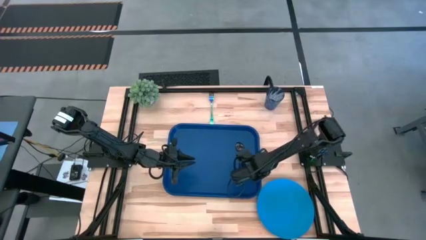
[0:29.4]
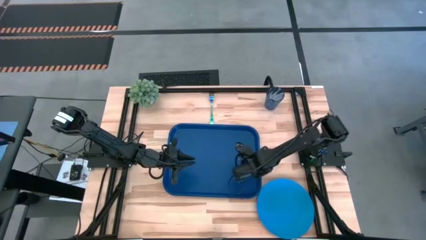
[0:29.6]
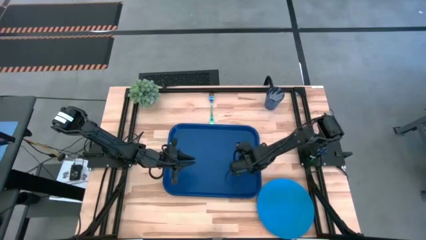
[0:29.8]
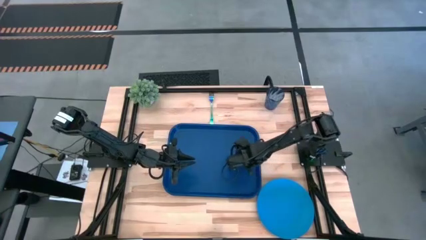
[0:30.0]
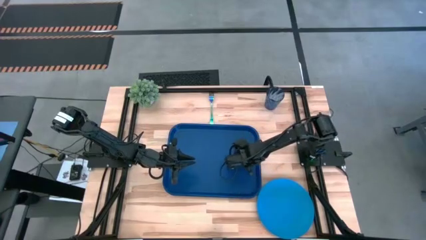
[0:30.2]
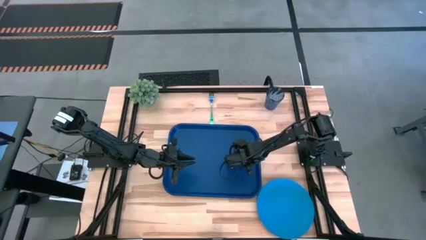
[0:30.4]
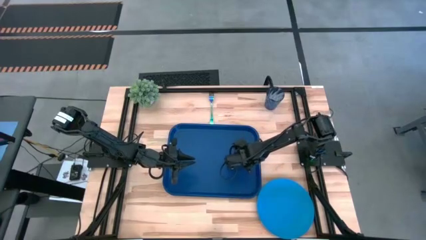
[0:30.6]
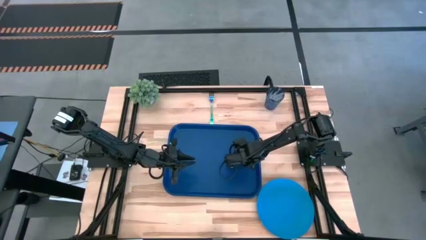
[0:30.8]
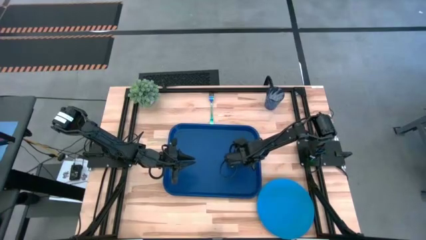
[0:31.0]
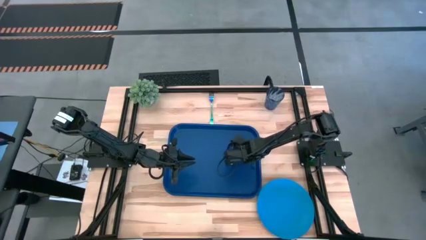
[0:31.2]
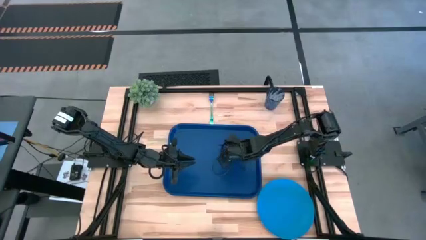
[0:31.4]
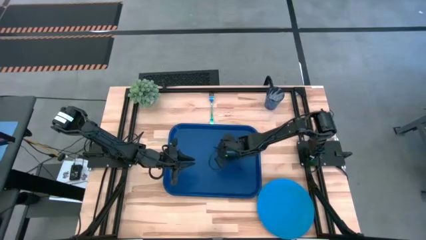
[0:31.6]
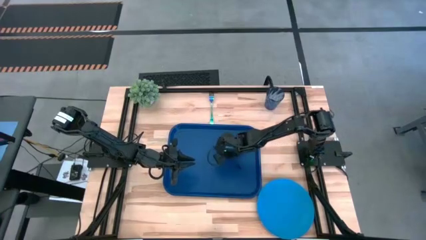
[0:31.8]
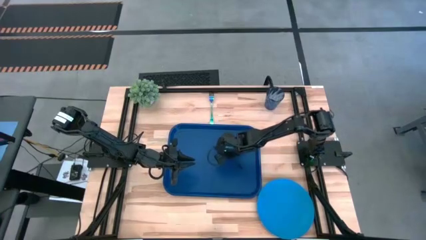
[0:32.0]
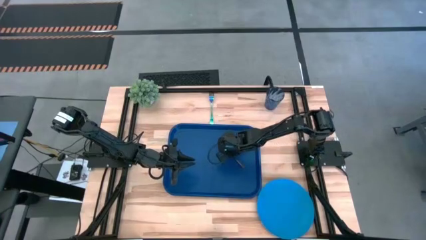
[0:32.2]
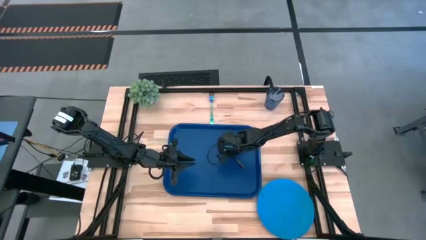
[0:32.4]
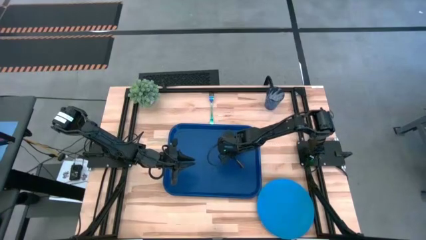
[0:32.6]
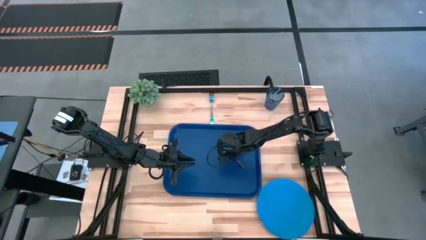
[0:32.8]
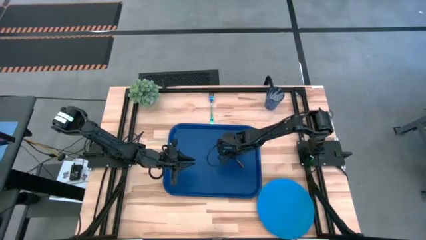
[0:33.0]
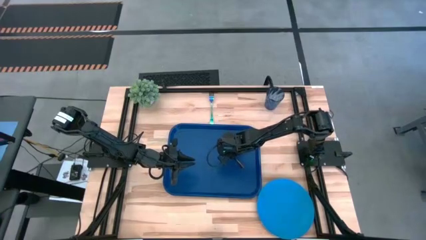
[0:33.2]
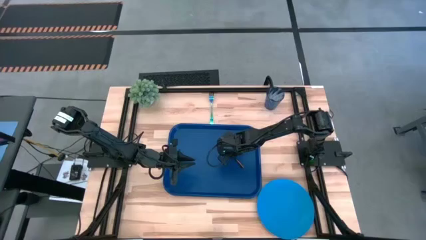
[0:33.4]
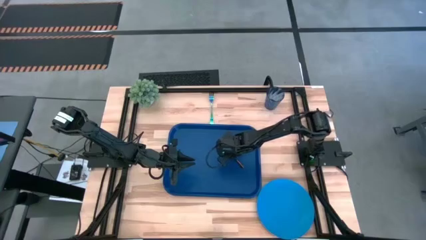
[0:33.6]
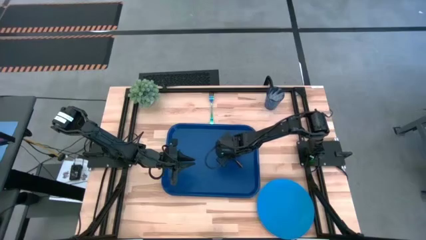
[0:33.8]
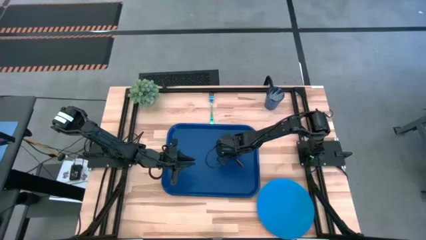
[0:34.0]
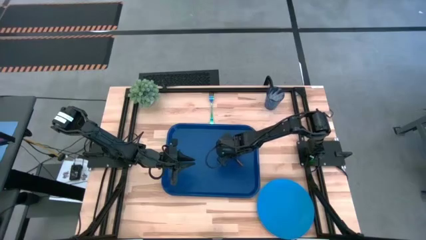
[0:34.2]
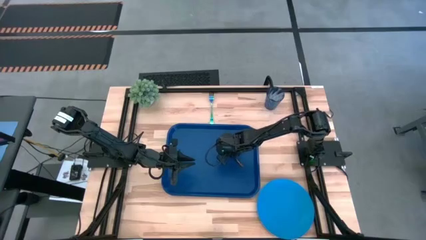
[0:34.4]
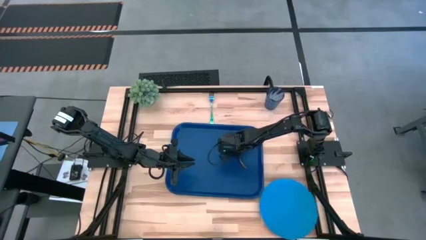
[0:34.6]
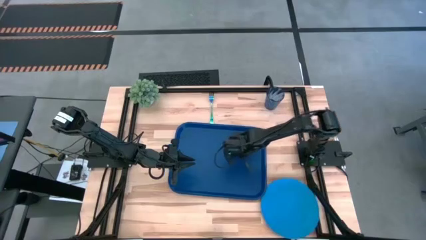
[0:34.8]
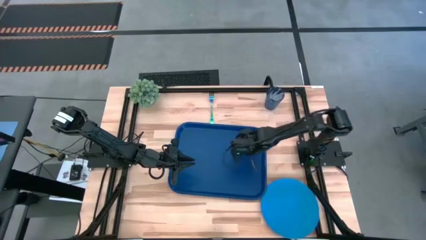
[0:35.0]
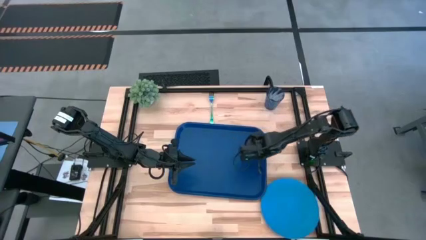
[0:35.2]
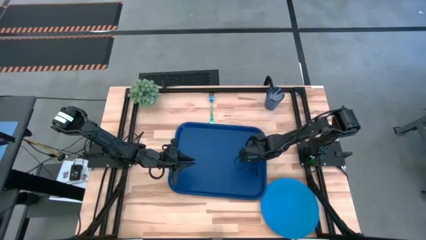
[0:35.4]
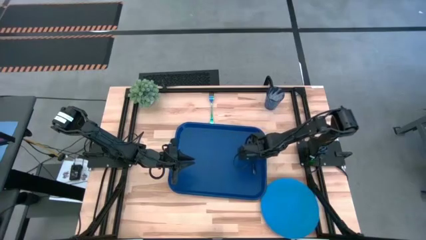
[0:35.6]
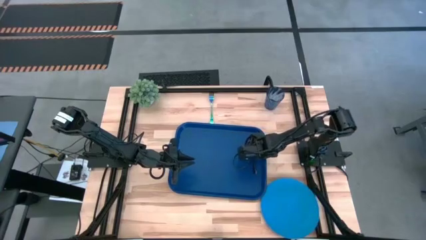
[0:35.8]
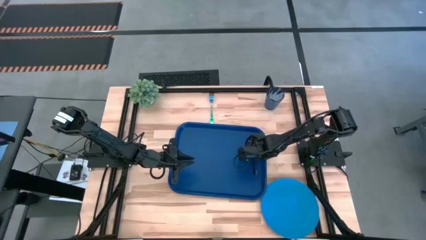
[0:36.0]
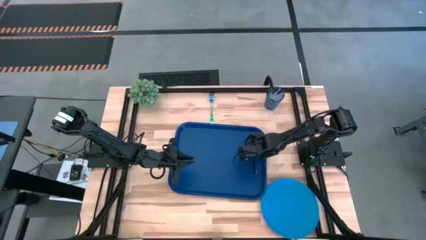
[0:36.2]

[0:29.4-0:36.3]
Task: Pick and place plate/cup/fork/spoon on tray
Put the black spoon on the blue tray

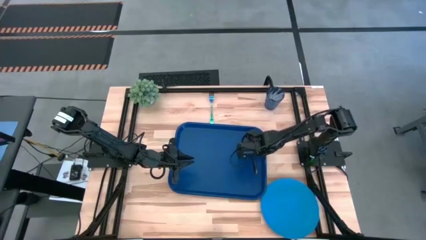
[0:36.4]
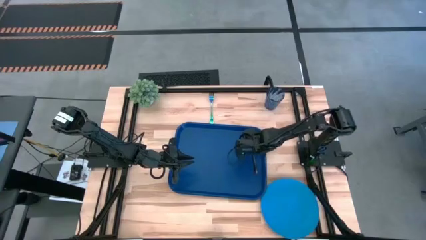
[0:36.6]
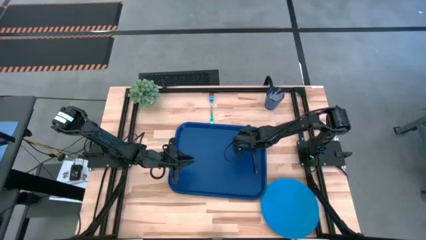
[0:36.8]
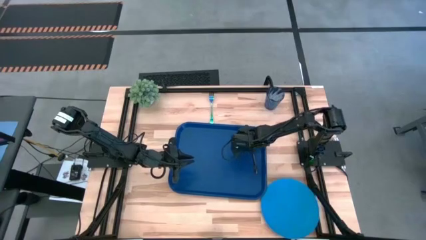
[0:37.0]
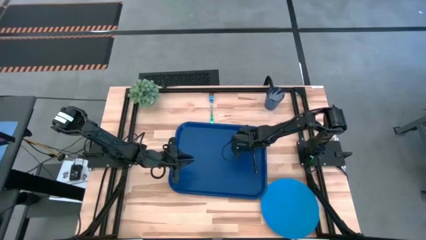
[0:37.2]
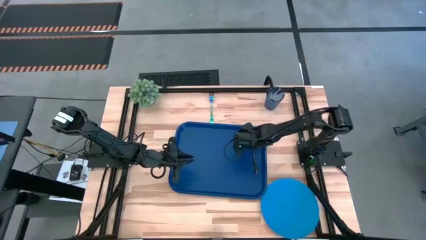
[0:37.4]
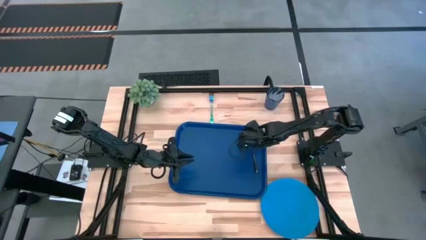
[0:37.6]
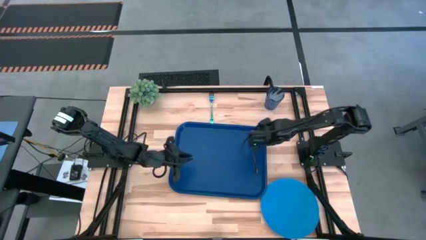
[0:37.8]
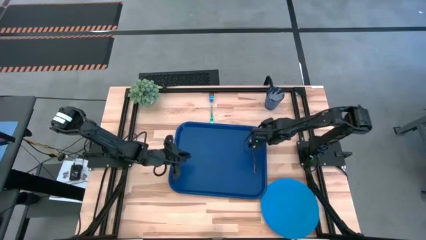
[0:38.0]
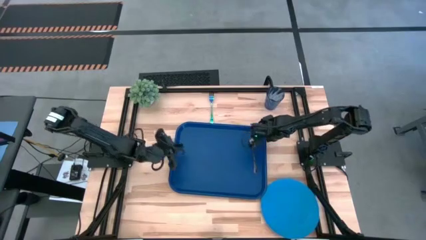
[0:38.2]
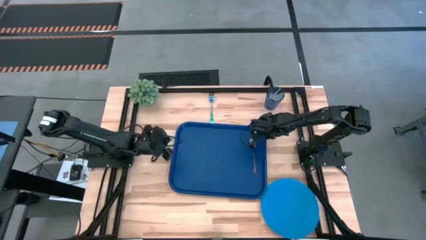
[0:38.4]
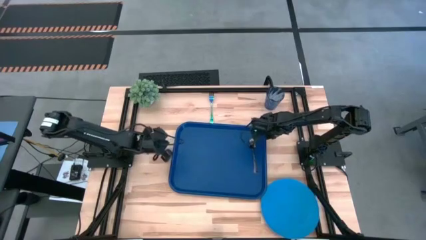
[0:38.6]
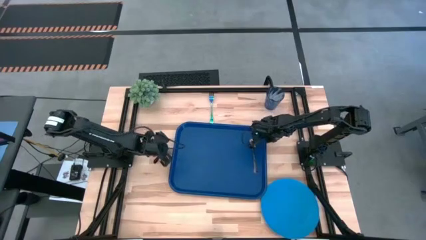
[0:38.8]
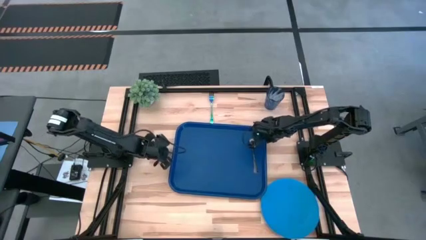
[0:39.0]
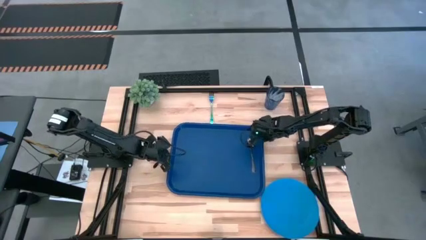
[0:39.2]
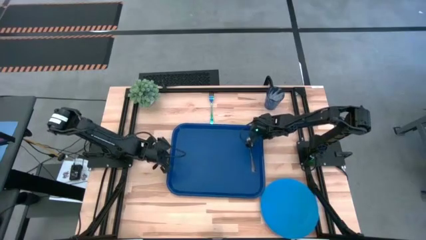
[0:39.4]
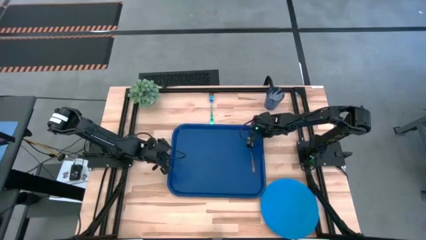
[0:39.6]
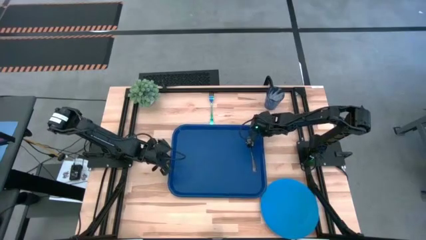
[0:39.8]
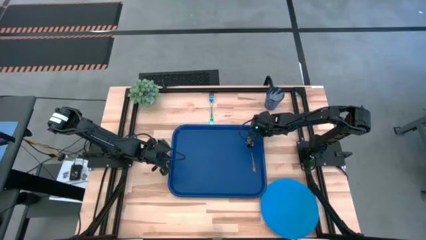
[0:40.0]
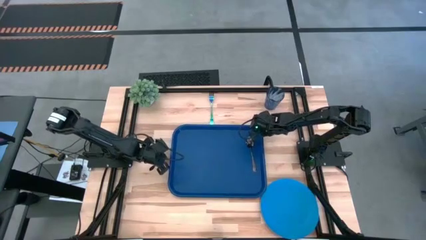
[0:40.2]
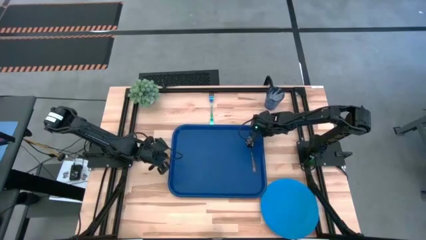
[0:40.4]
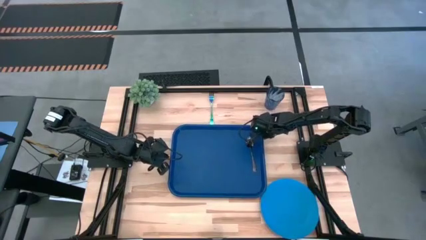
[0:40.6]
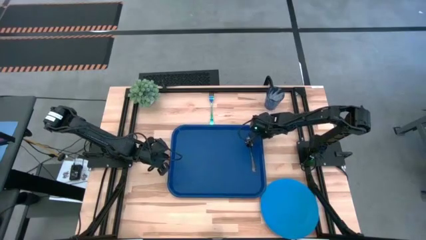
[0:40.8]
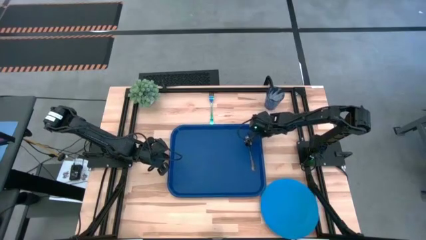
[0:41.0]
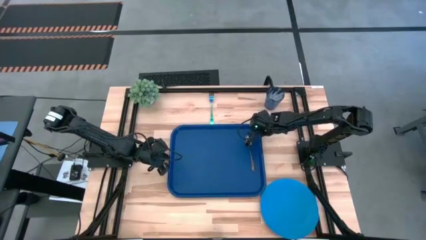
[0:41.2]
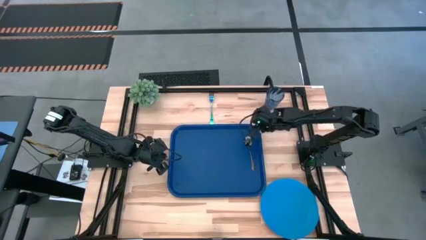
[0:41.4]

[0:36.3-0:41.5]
Adjust the blue tray

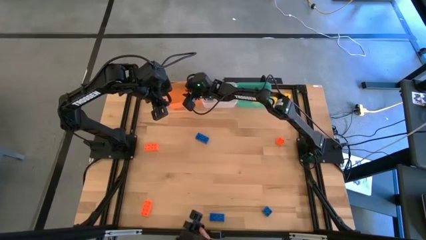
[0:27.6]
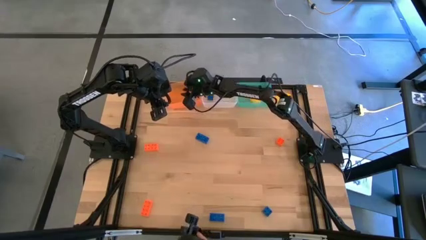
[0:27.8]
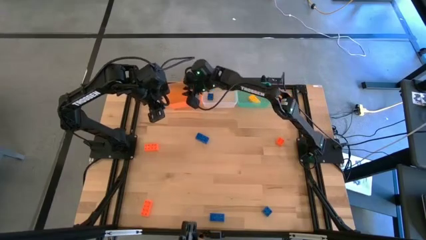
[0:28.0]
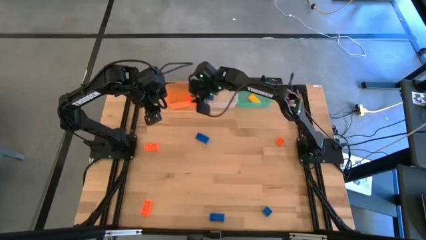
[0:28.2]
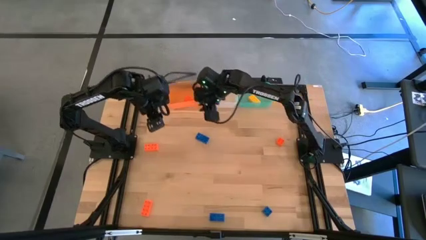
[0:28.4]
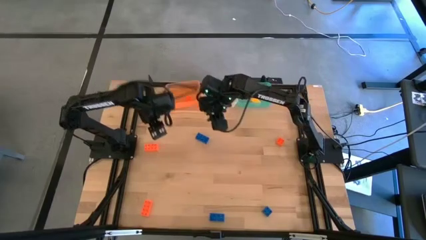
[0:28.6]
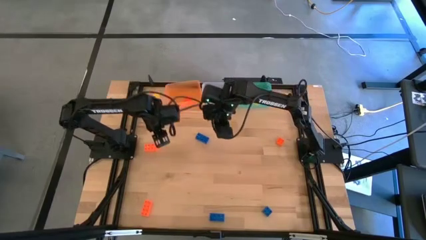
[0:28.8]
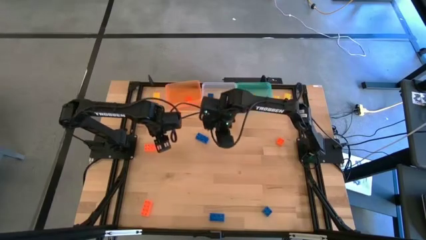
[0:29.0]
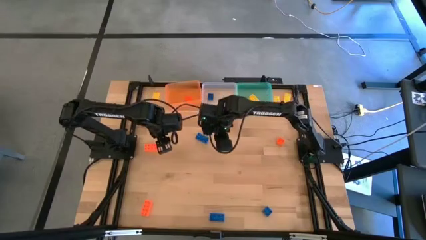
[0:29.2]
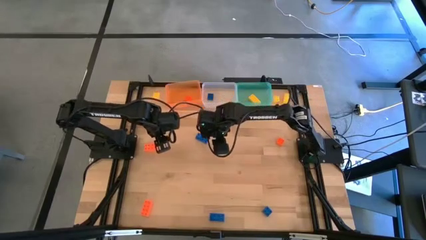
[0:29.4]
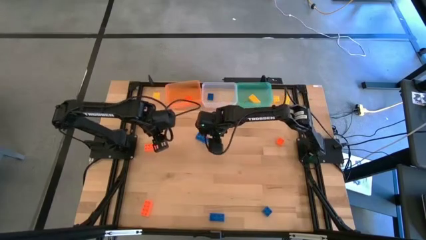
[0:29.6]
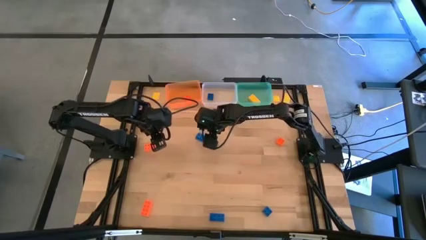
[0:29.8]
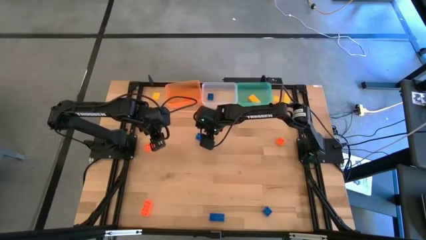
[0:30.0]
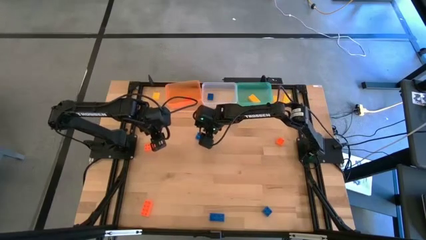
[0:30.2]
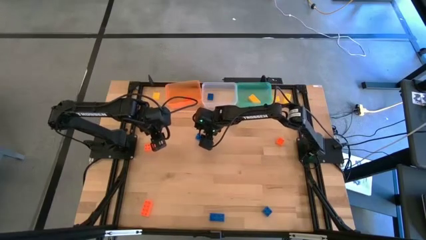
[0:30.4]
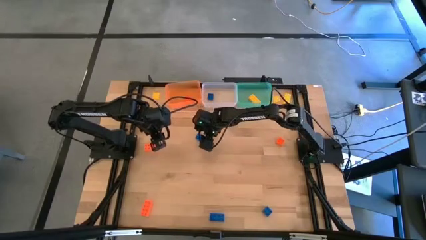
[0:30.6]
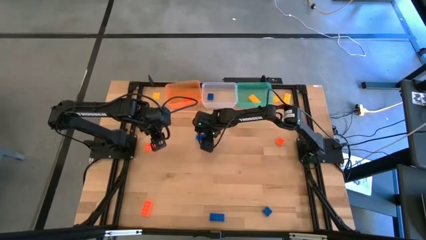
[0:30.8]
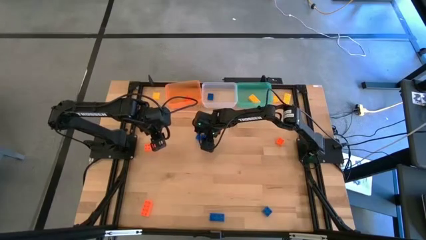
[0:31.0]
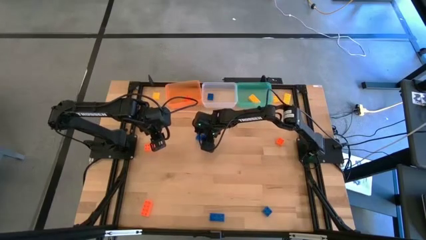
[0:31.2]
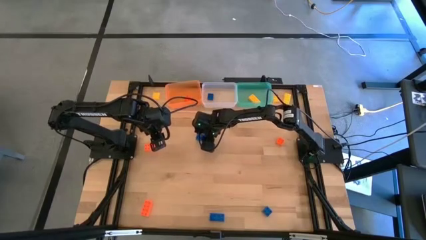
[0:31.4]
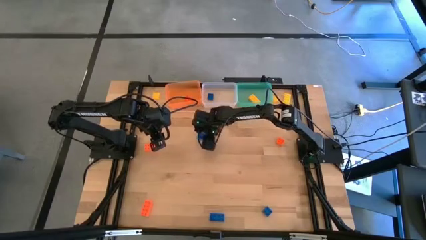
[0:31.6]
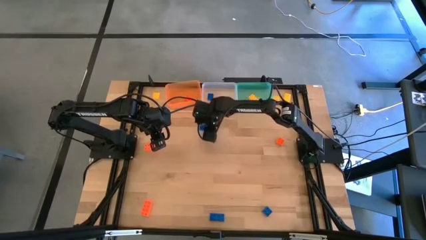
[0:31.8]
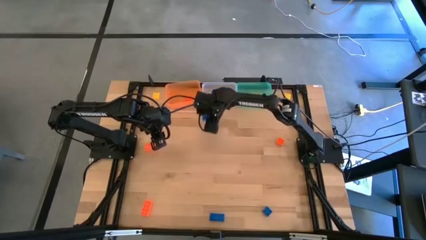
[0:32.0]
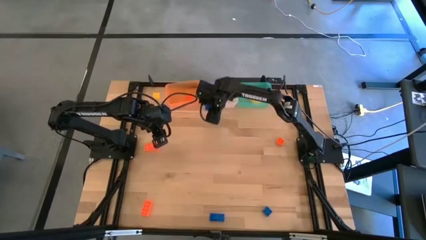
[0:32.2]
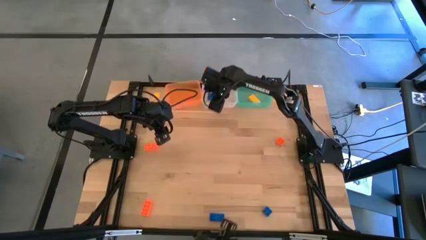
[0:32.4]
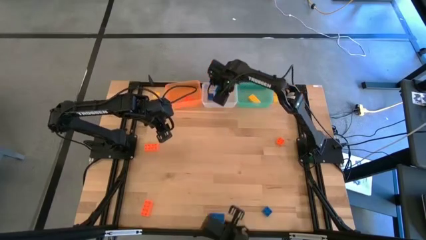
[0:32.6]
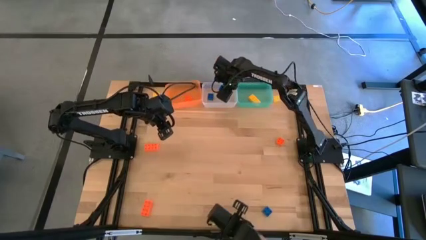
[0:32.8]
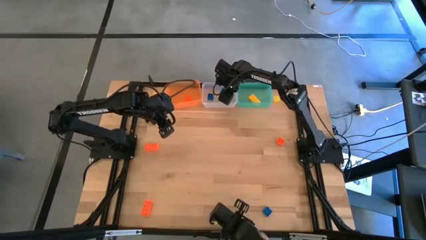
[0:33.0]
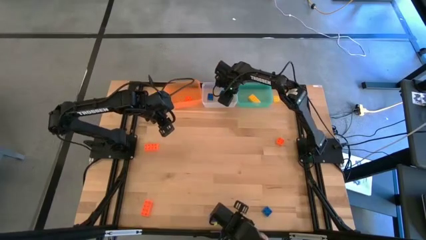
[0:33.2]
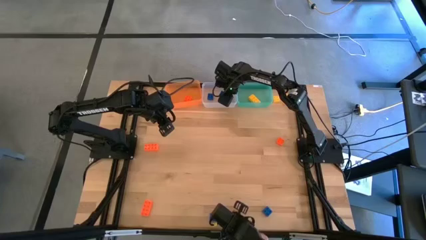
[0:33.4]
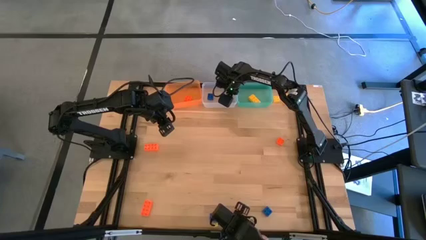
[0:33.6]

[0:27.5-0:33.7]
Task: Sort & place blocks by color
Put the blue game piece into the transparent bin
